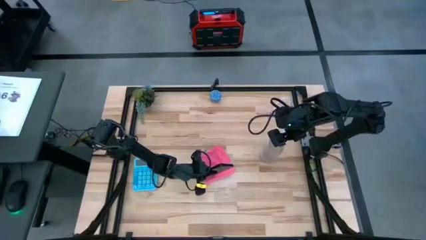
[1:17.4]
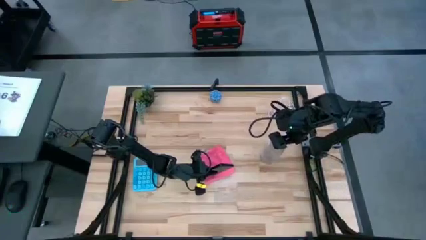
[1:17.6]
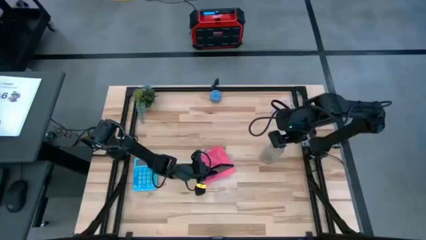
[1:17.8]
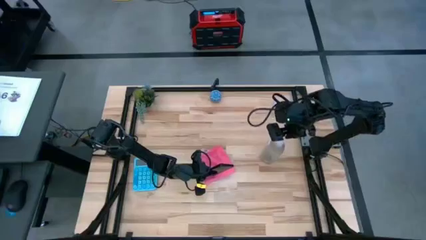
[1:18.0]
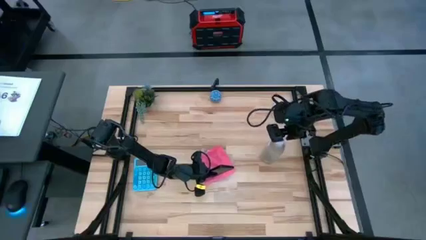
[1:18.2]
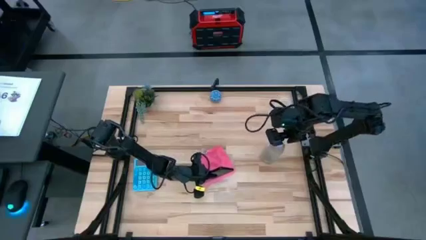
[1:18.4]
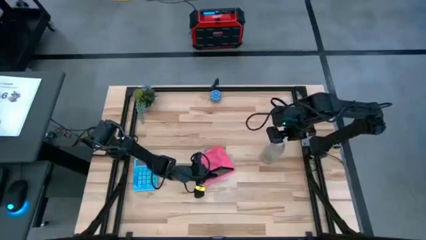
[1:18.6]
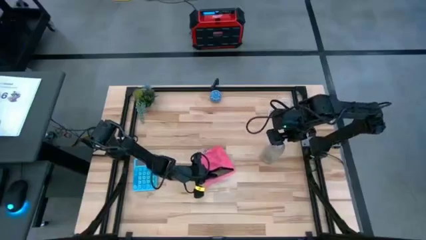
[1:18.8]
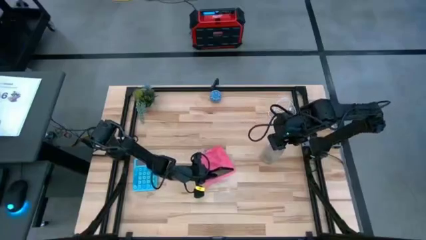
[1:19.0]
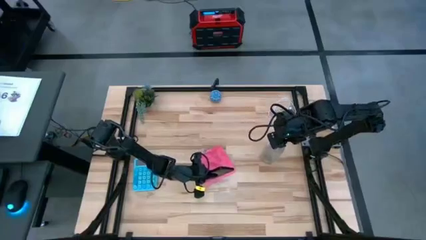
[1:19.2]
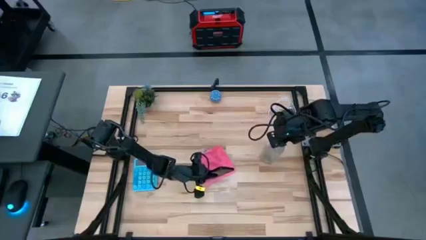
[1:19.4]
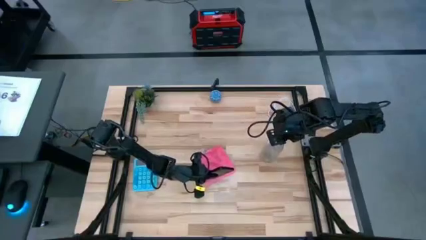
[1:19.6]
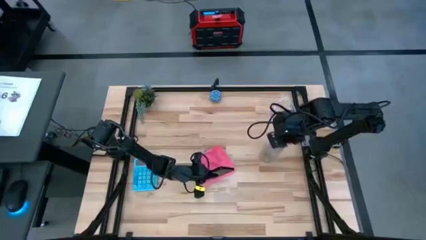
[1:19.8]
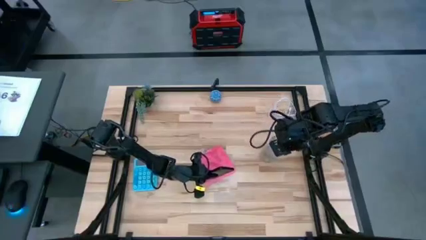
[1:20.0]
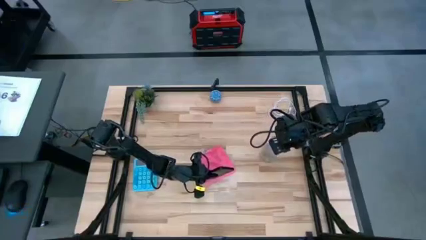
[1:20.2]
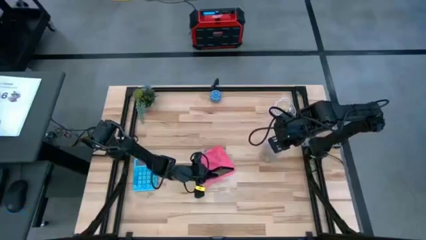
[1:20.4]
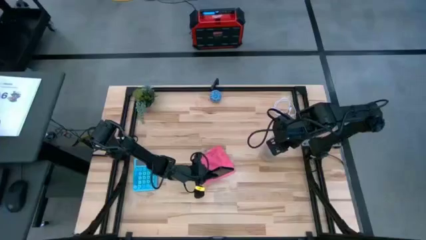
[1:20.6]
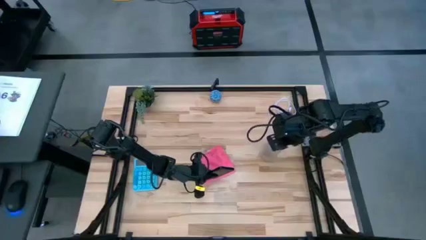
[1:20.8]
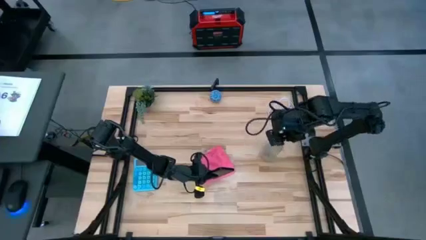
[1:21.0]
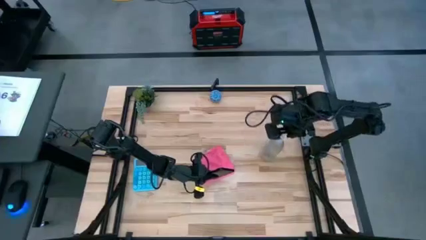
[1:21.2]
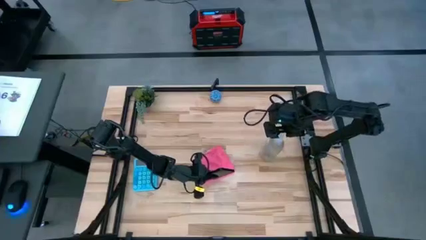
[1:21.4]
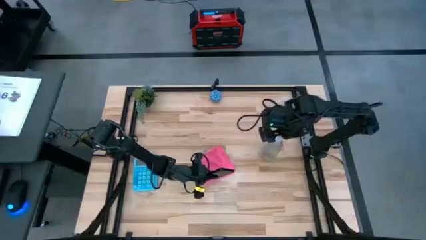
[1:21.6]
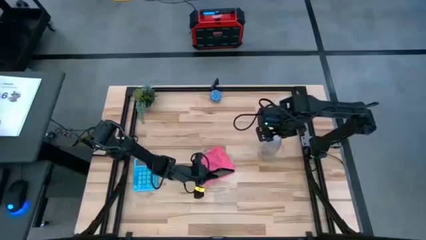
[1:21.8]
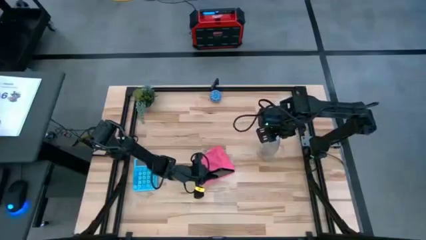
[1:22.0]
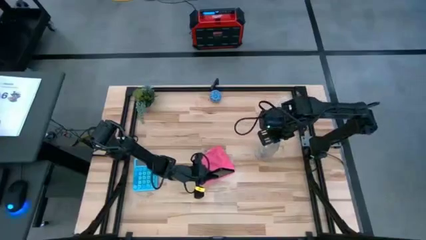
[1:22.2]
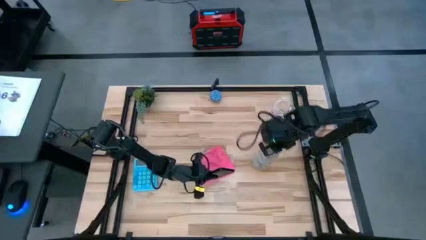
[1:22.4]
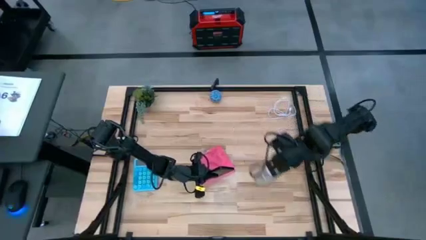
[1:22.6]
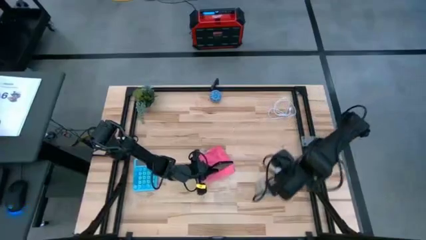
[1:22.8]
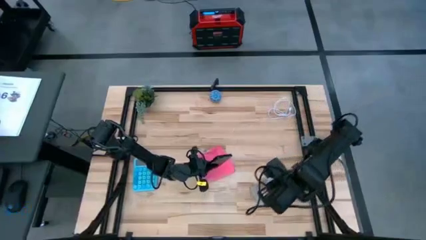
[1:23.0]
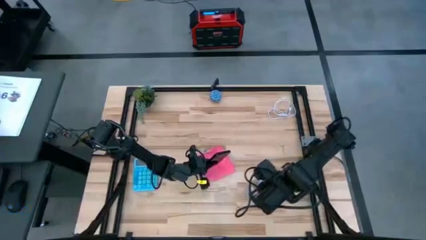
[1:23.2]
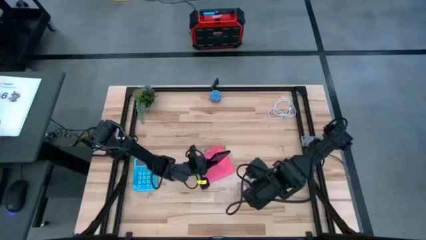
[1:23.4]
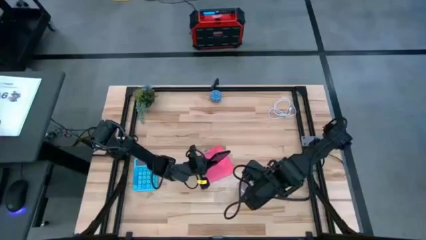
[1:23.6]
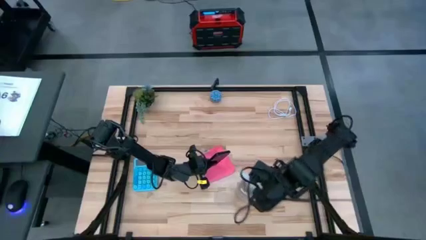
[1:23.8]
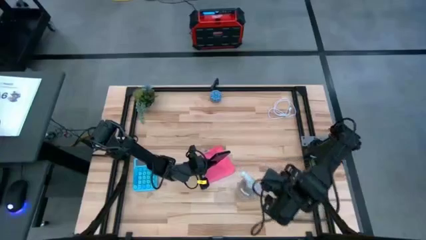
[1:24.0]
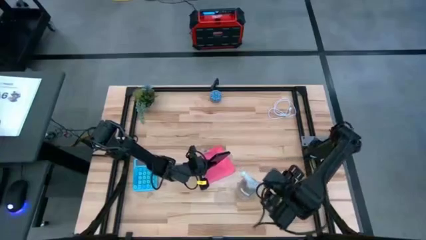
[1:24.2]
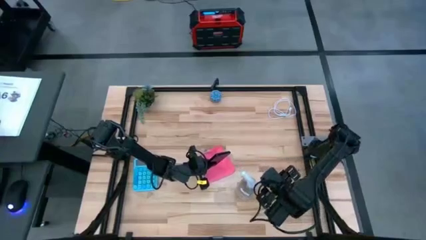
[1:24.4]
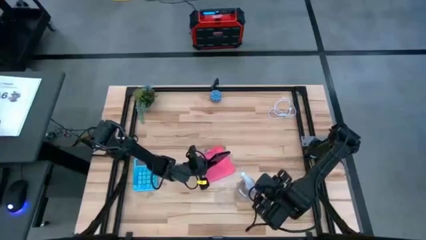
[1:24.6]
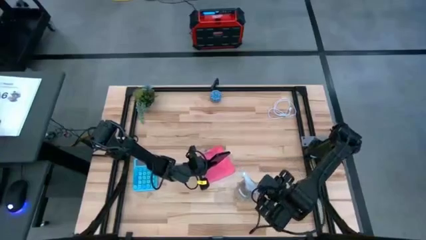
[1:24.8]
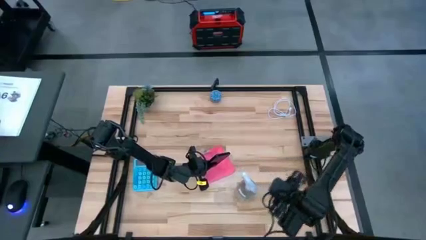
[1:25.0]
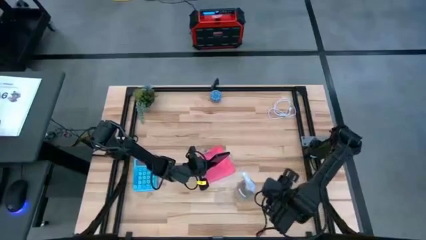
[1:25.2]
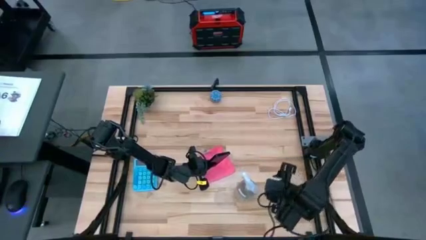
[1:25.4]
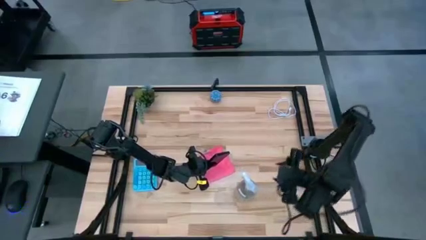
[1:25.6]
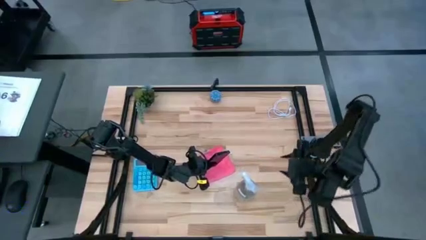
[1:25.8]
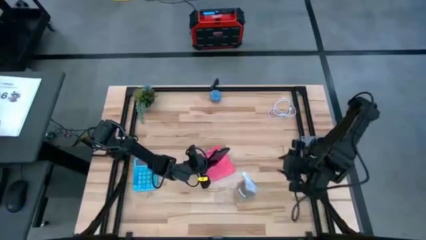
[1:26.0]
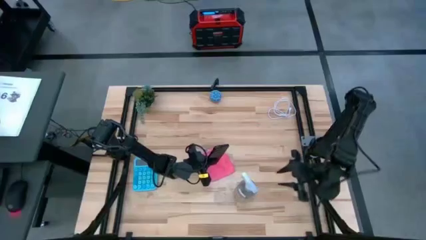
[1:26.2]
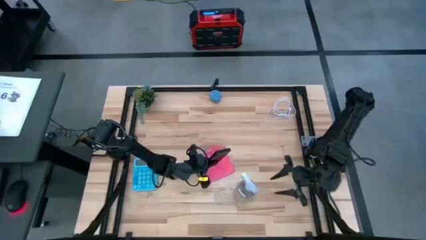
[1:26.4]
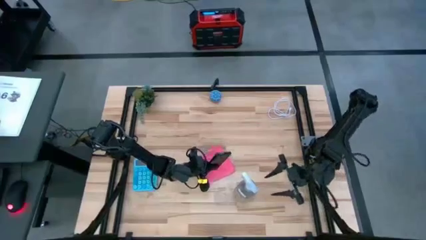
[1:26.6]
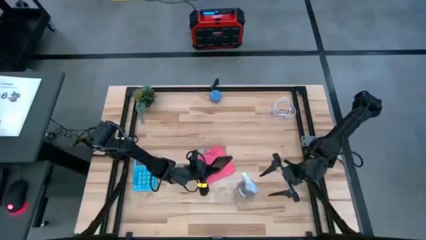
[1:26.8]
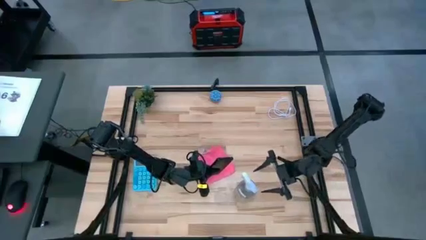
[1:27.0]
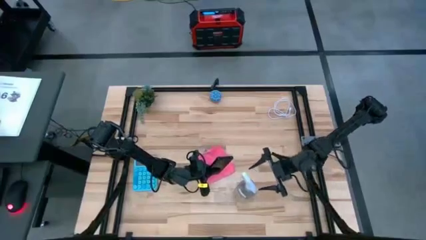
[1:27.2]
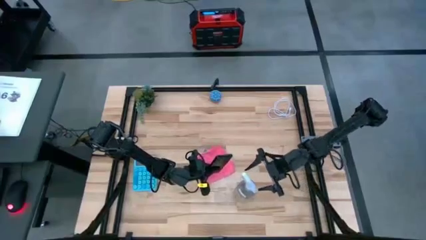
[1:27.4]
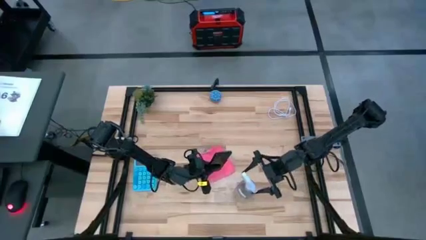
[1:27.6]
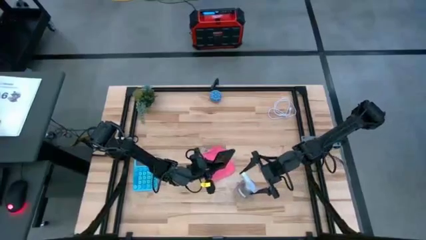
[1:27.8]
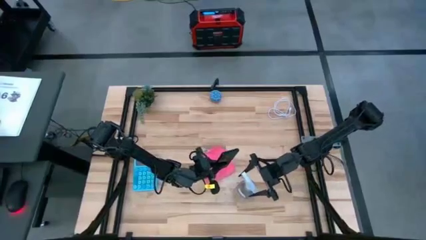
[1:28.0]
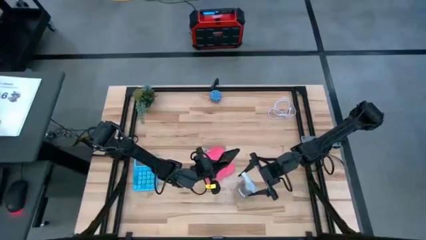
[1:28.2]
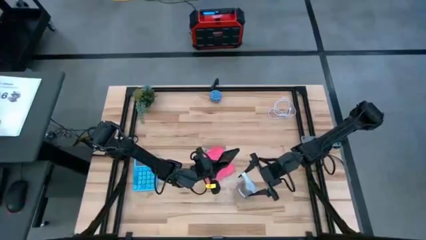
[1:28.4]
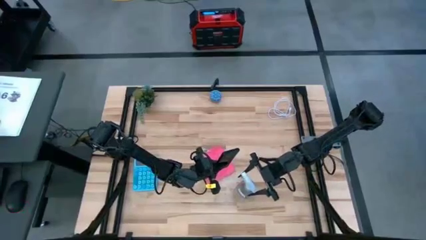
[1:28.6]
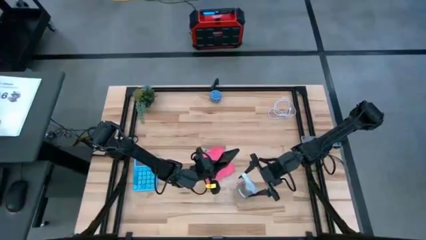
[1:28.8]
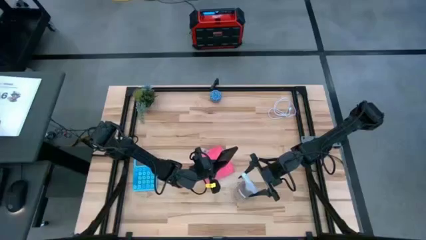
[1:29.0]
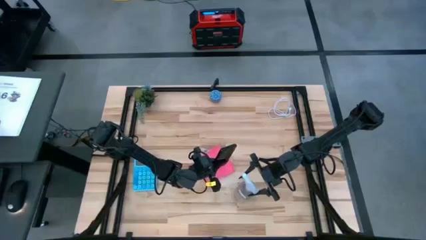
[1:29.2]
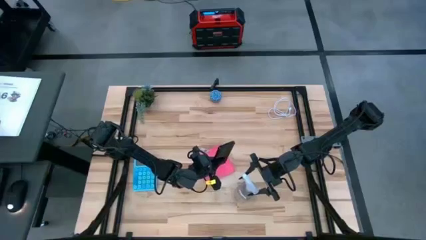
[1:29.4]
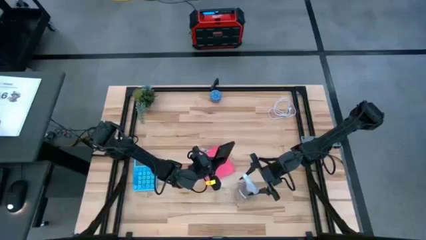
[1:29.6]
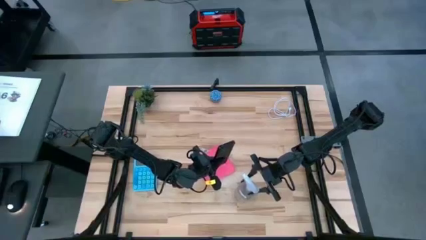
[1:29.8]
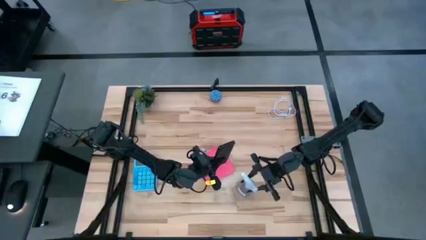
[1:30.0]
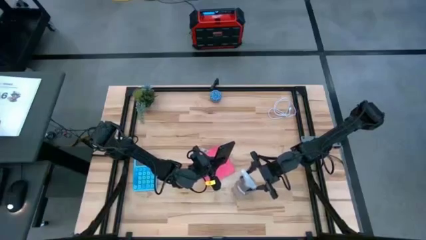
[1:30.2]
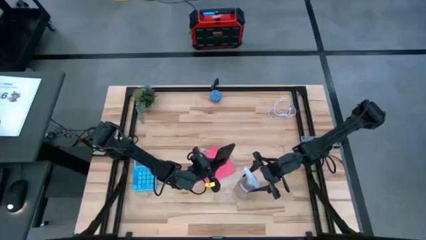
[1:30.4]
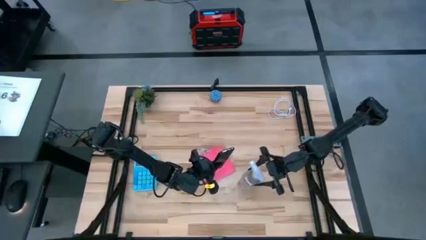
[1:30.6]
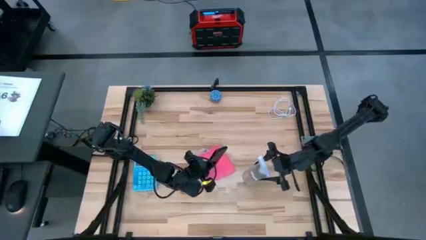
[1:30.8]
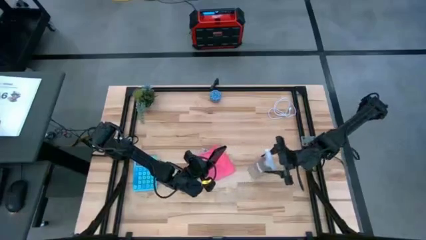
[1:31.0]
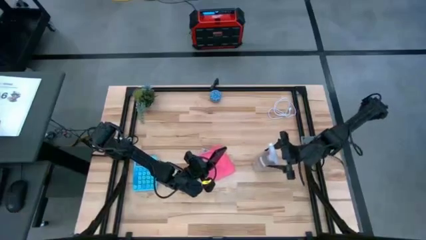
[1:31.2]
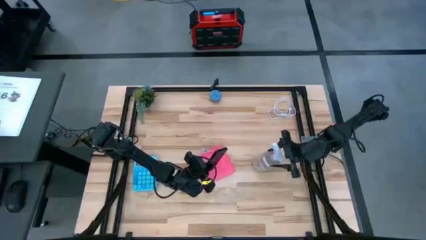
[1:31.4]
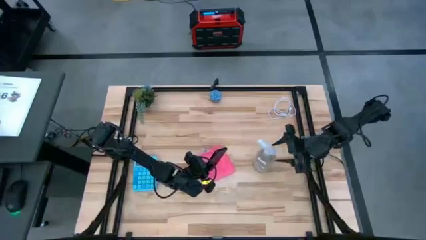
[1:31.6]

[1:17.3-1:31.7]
Task: Apply microfiber cloth
Spray the black cellphone with the transparent spray bottle
